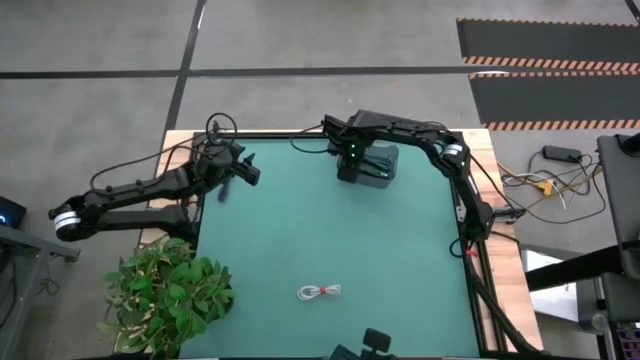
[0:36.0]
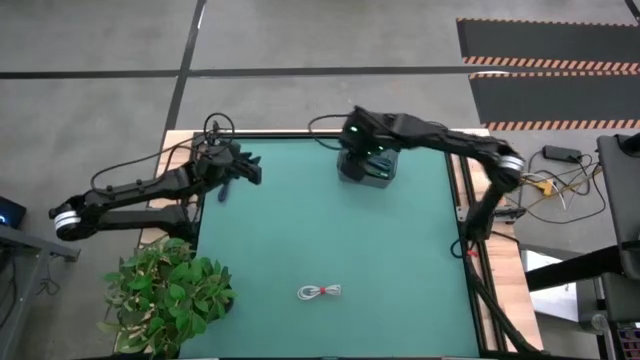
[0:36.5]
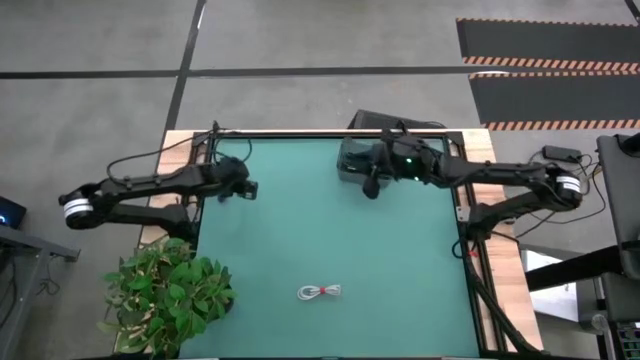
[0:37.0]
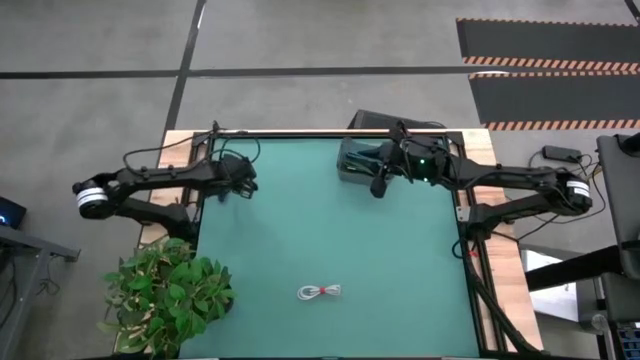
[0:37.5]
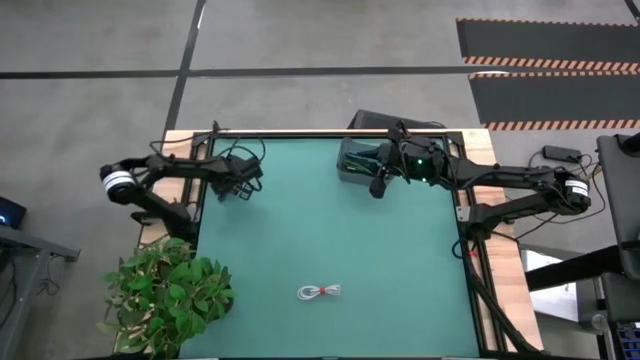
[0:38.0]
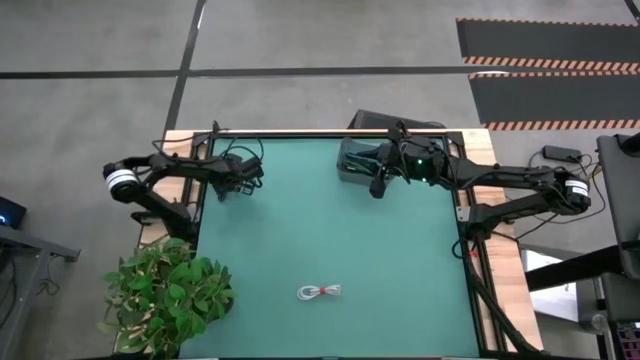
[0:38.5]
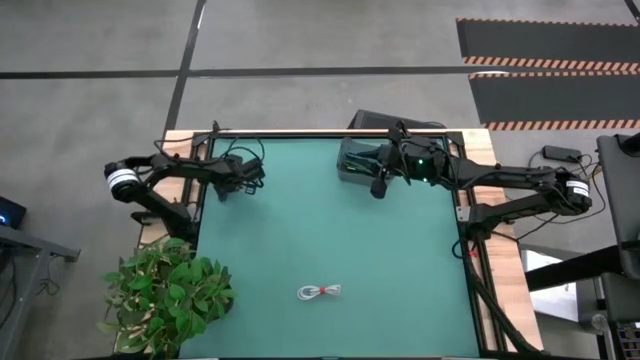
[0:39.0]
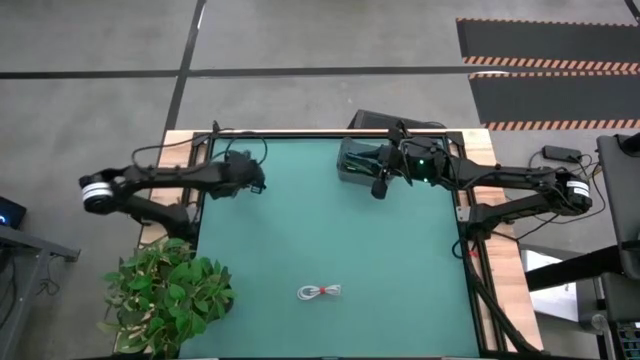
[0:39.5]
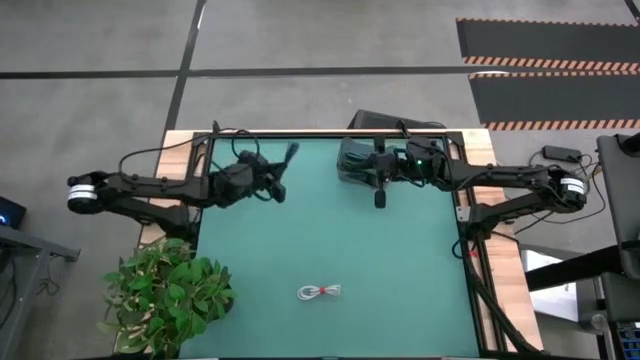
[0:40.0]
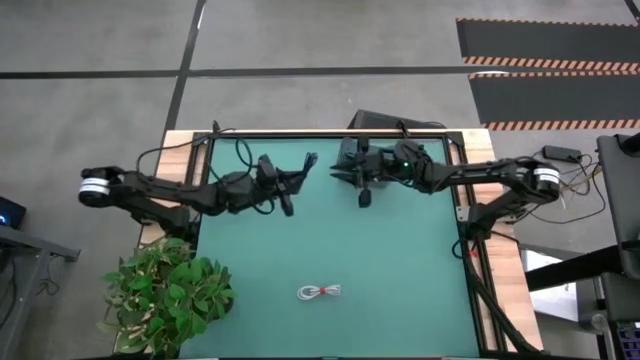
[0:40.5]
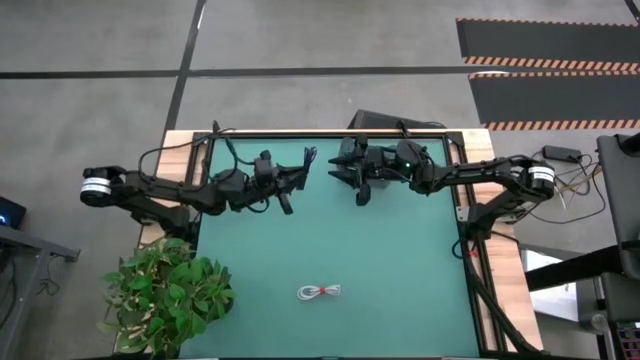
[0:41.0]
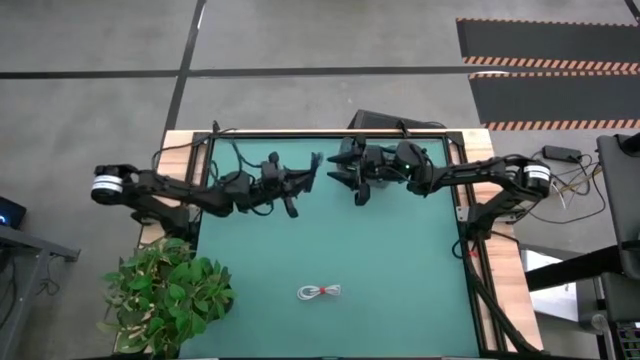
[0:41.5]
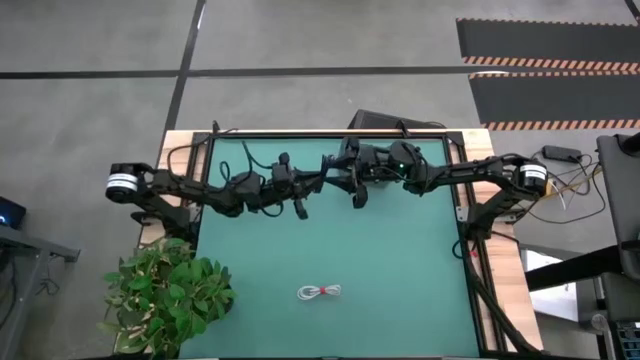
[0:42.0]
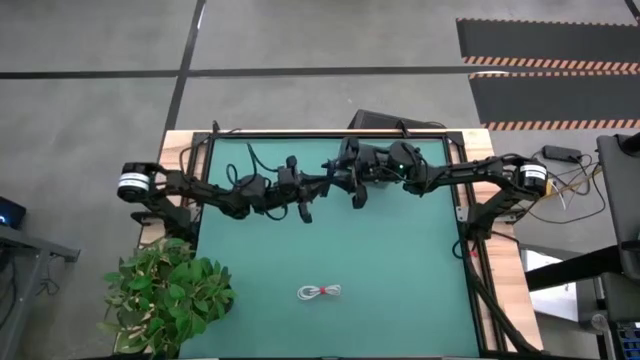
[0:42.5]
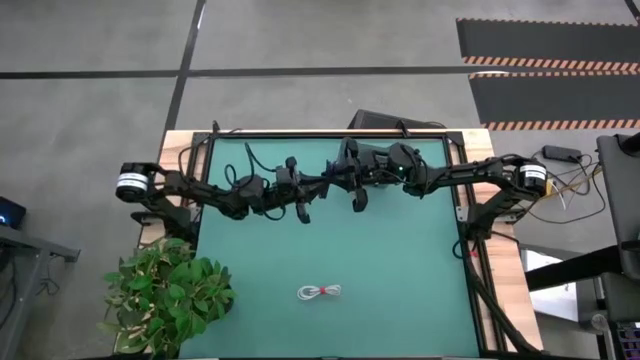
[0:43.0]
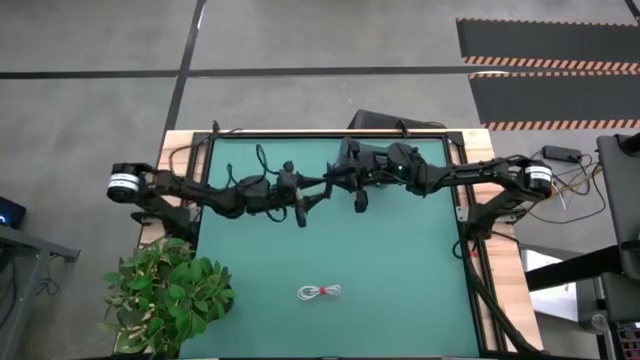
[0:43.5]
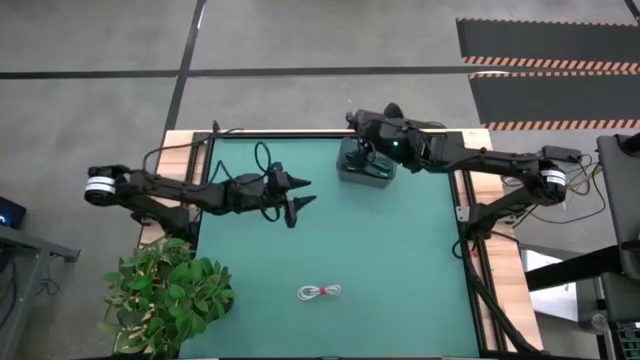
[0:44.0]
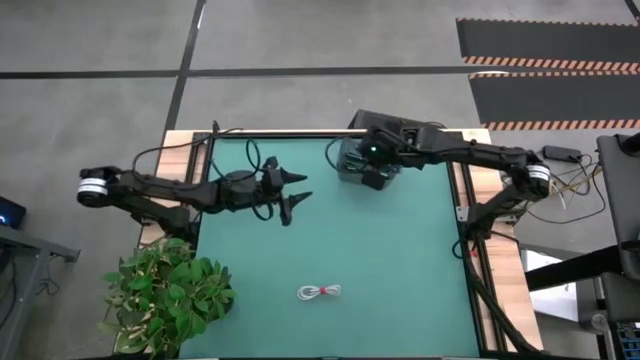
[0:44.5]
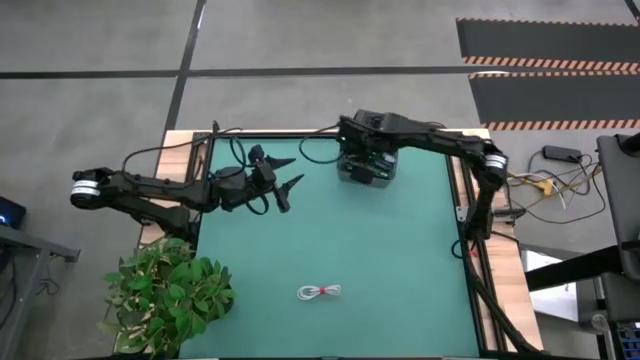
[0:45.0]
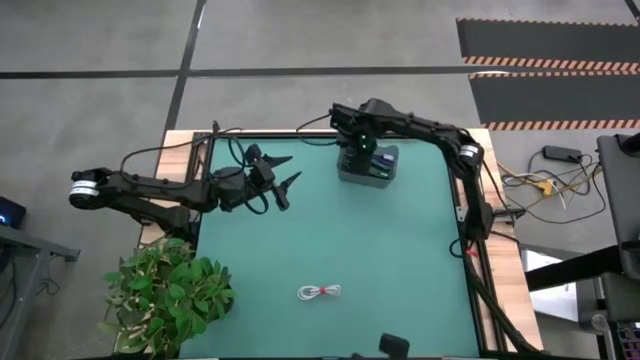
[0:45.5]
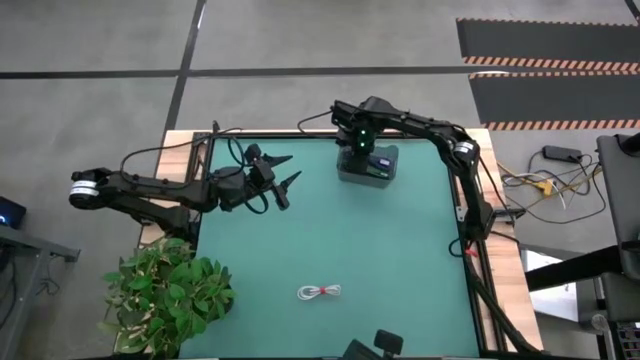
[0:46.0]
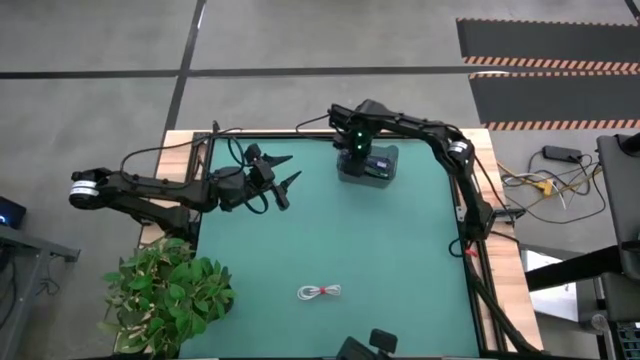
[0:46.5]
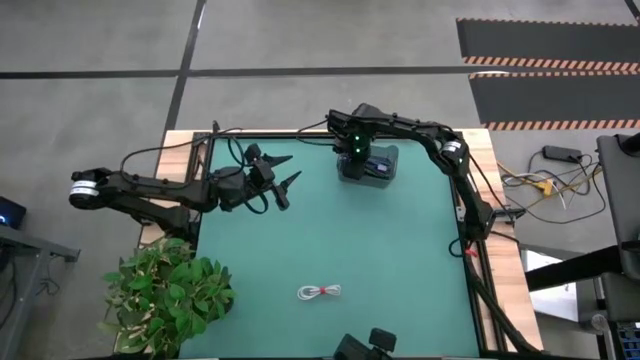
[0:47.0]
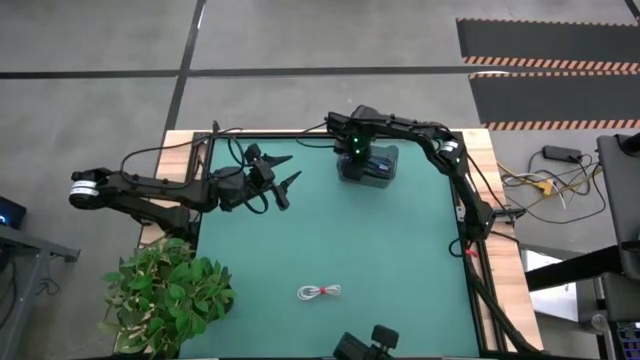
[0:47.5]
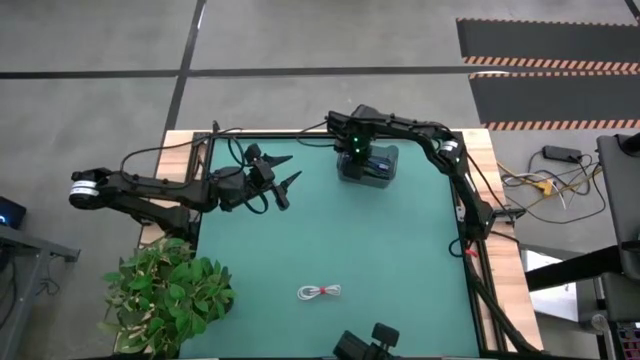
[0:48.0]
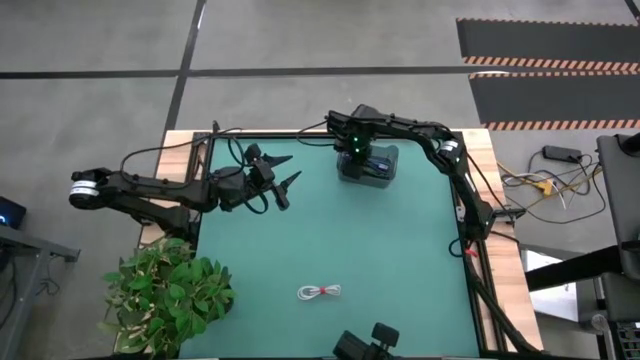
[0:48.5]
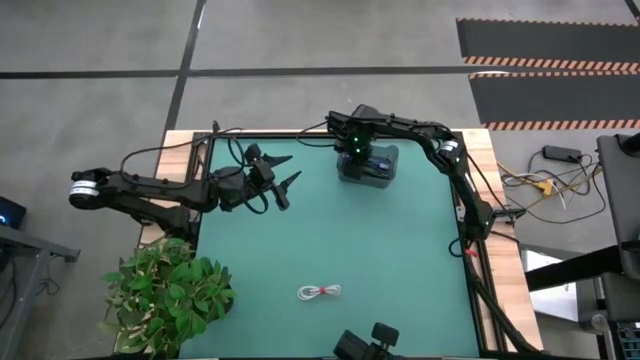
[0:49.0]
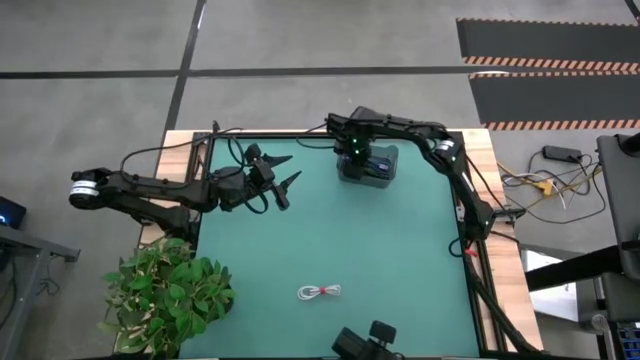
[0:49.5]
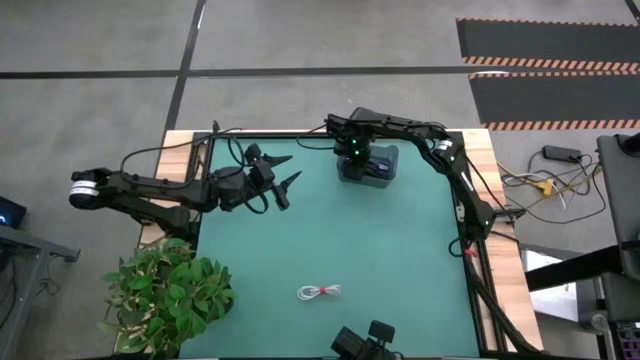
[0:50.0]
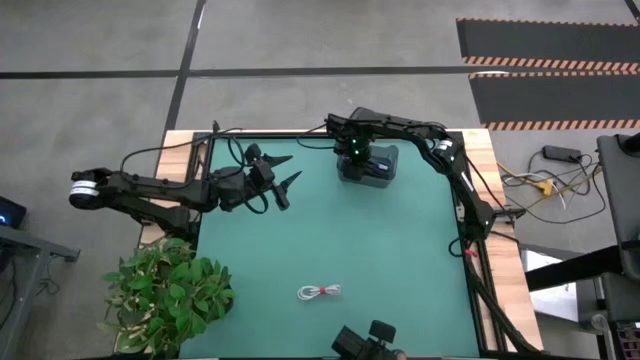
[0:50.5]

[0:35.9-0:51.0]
Task: Pick and place USB-C Cables
Put the purple cable into the black bin

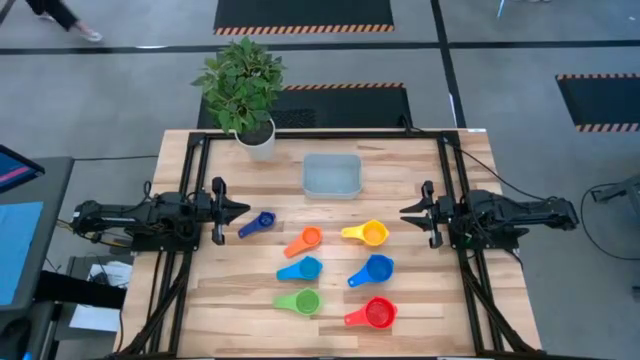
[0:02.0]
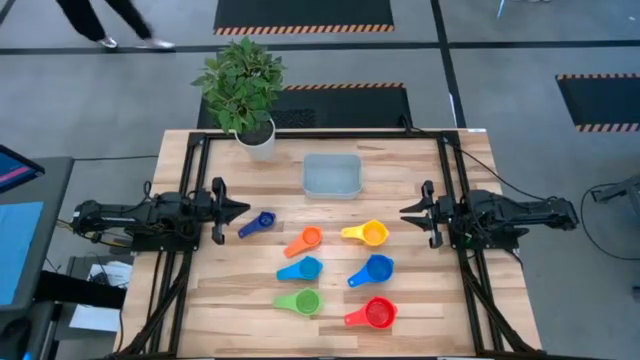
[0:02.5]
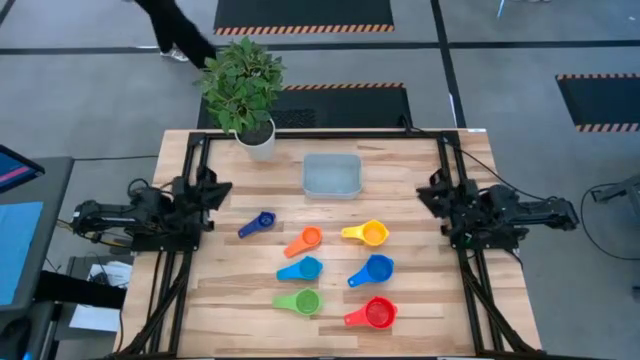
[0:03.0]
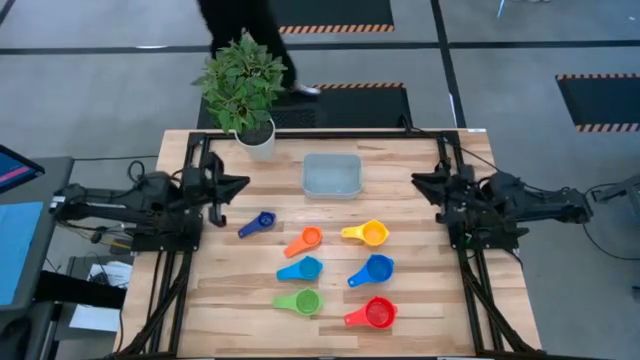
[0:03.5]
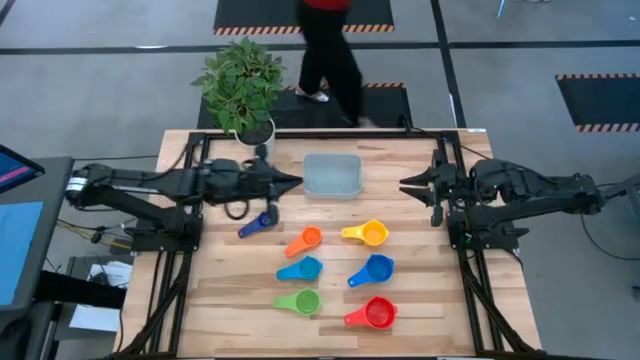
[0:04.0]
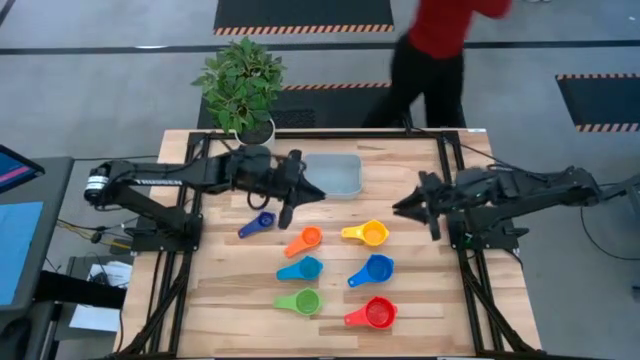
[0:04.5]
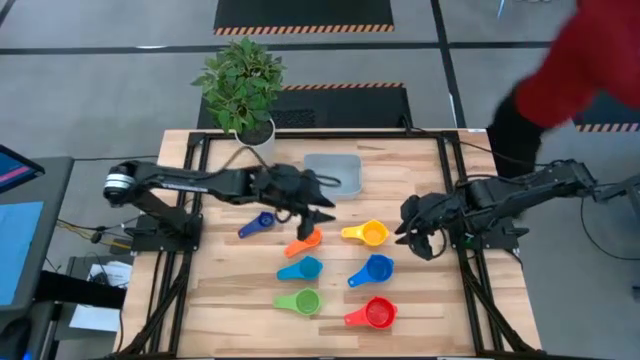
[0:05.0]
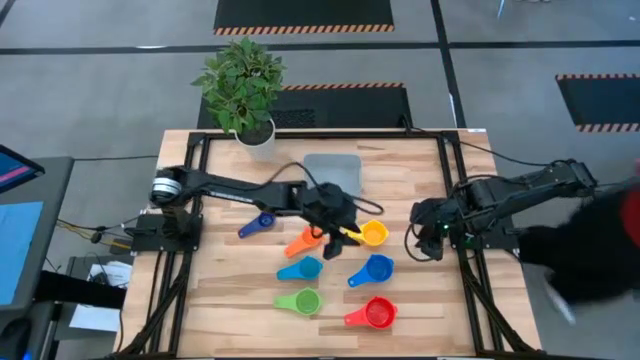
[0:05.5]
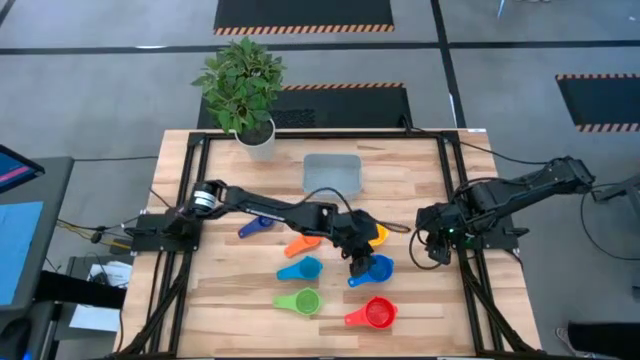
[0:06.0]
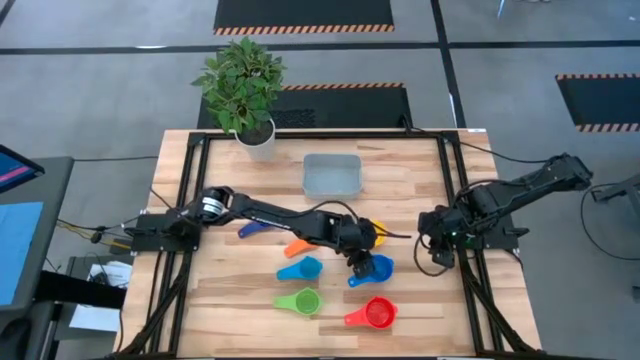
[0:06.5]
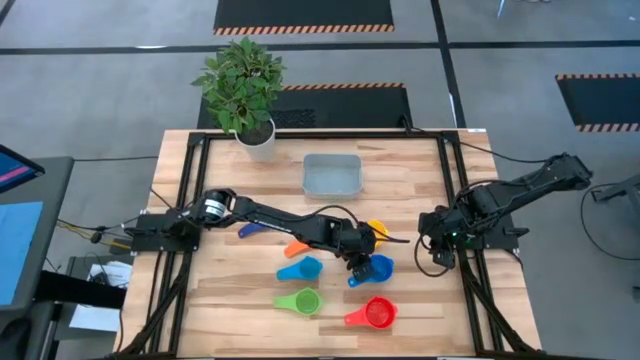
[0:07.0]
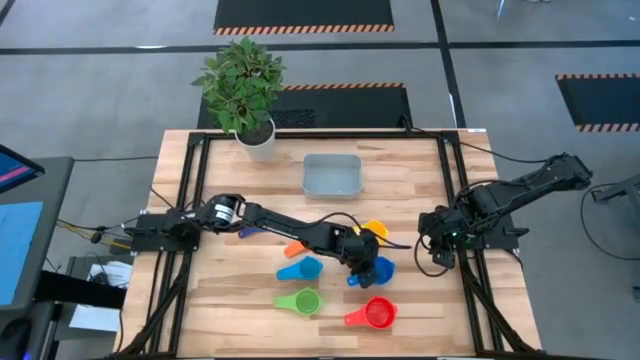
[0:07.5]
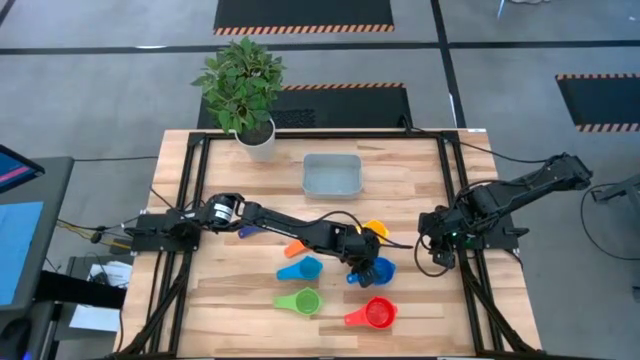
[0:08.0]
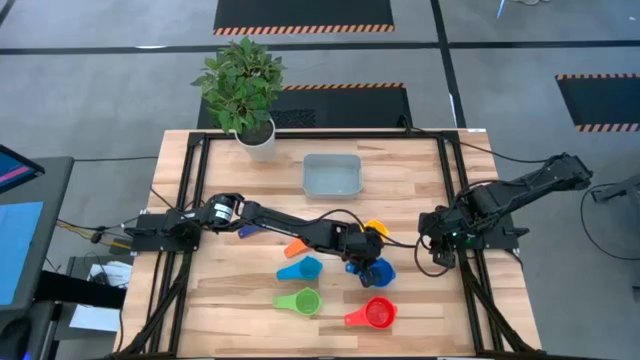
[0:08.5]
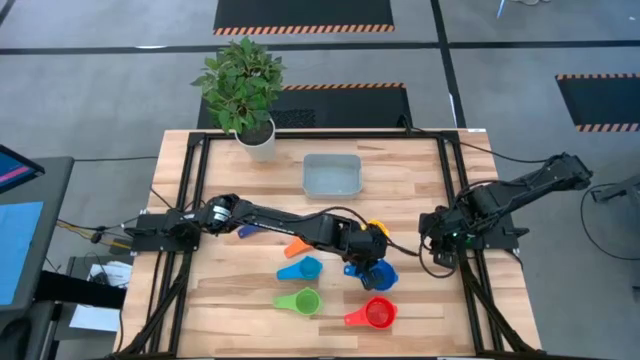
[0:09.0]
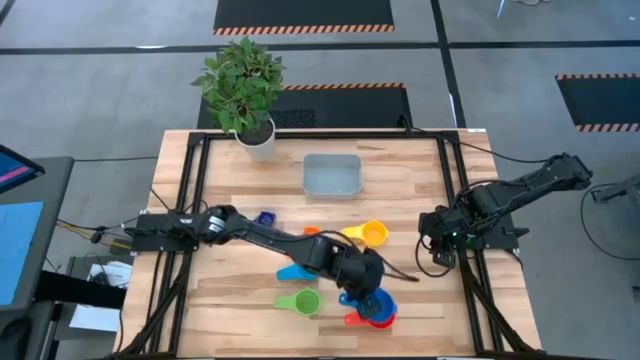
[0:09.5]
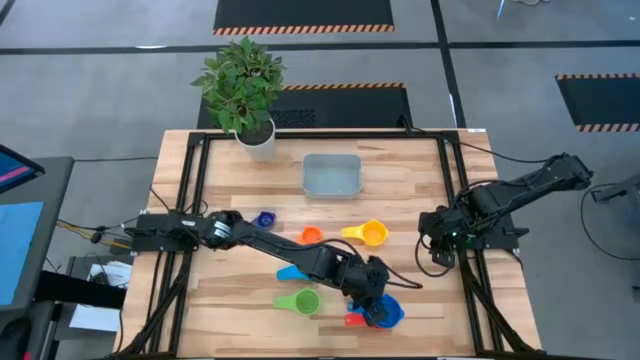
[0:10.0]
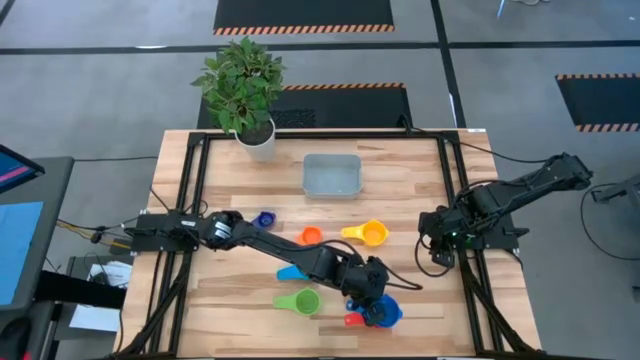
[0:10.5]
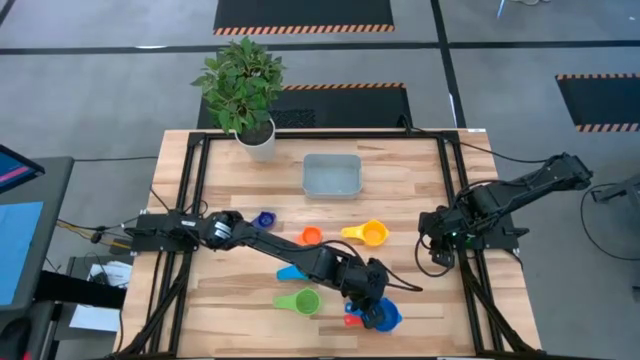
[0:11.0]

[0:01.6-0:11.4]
Task: Nest measuring cups in basket
Stack the blue measuring cup on top of the red measuring cup
